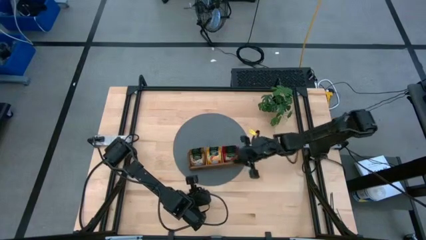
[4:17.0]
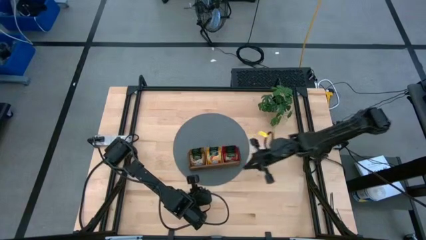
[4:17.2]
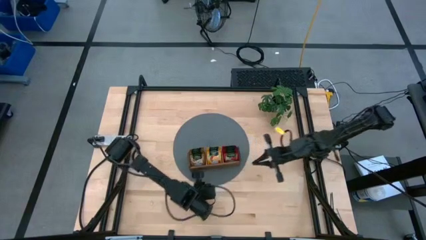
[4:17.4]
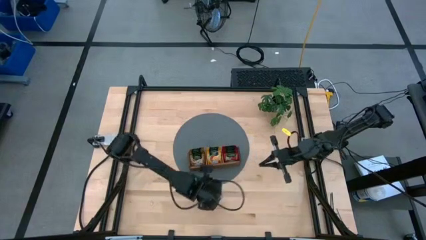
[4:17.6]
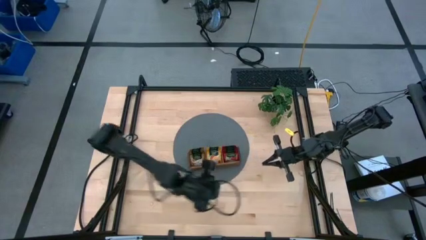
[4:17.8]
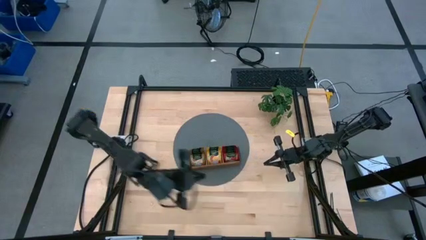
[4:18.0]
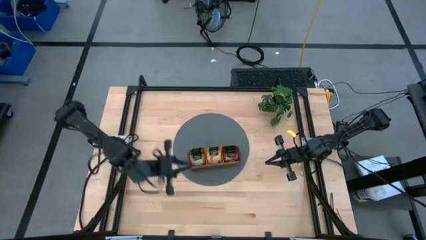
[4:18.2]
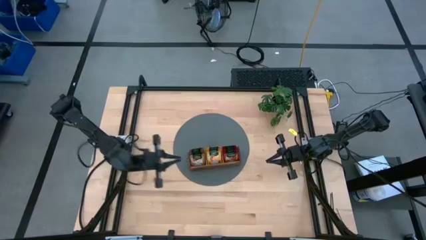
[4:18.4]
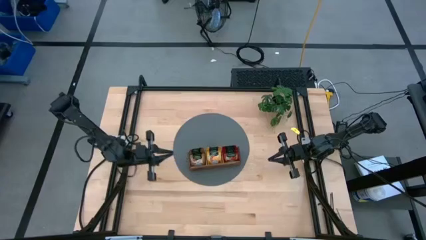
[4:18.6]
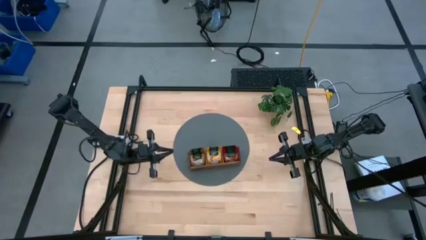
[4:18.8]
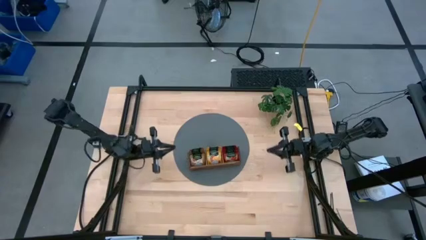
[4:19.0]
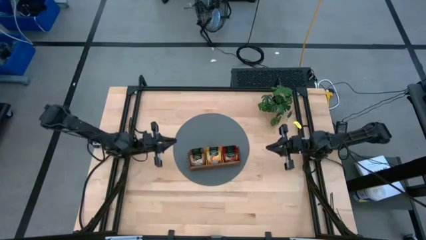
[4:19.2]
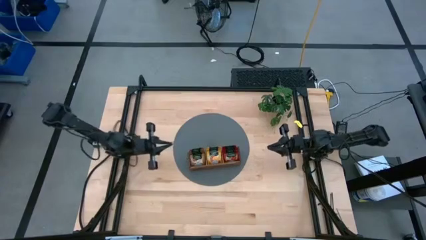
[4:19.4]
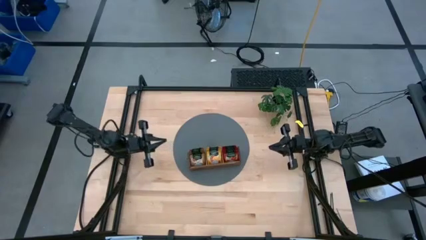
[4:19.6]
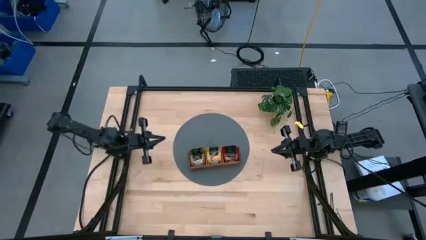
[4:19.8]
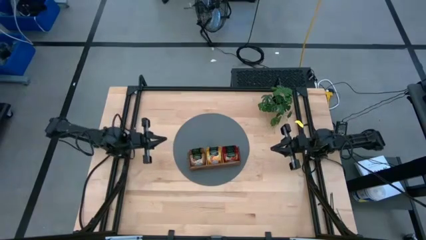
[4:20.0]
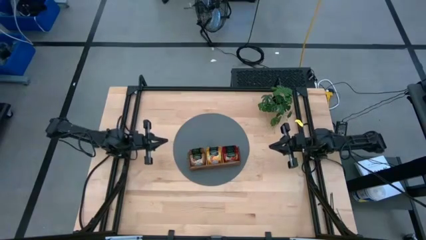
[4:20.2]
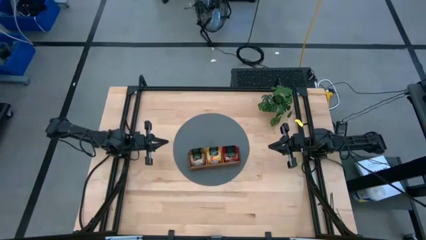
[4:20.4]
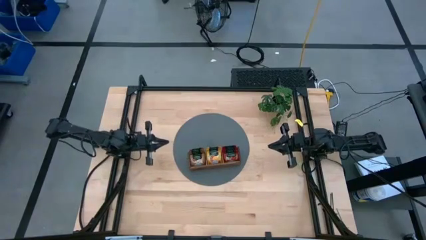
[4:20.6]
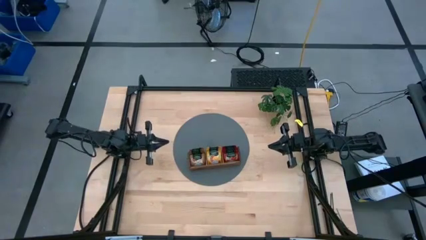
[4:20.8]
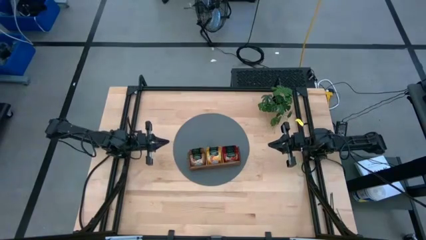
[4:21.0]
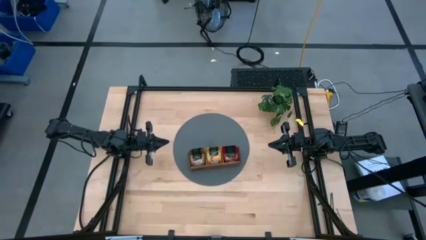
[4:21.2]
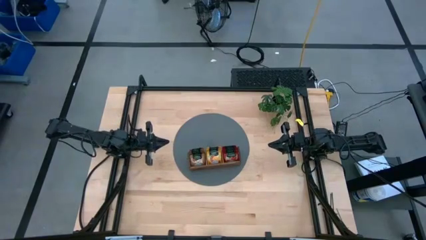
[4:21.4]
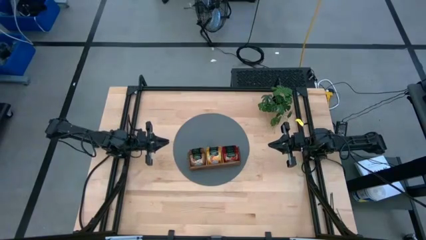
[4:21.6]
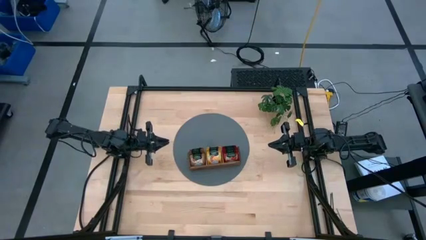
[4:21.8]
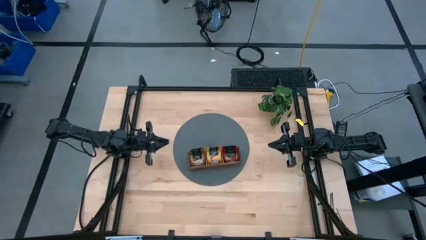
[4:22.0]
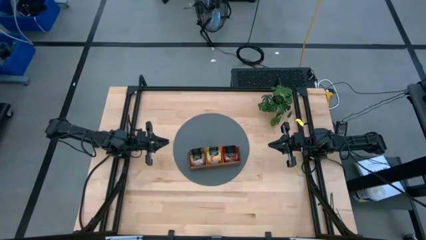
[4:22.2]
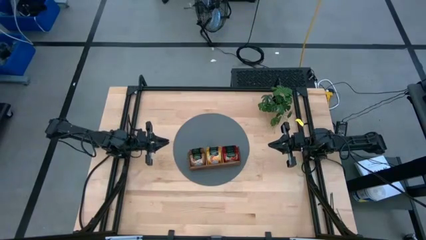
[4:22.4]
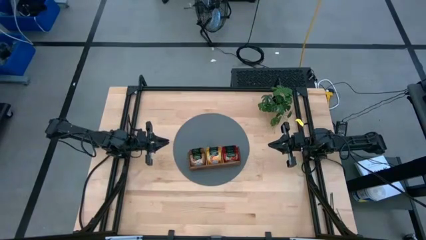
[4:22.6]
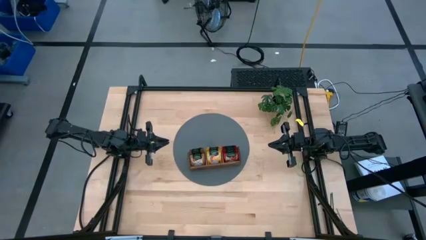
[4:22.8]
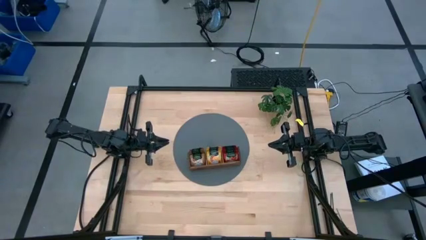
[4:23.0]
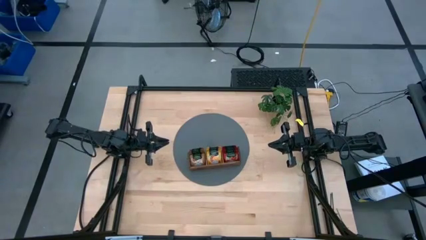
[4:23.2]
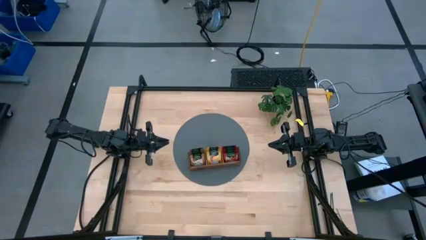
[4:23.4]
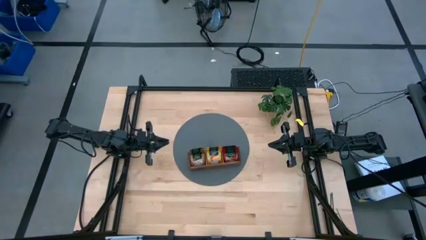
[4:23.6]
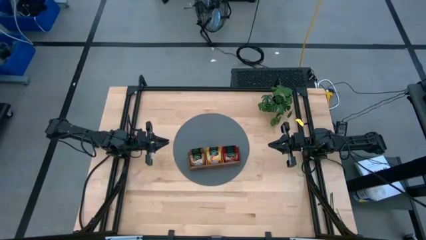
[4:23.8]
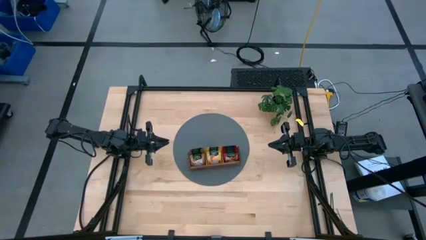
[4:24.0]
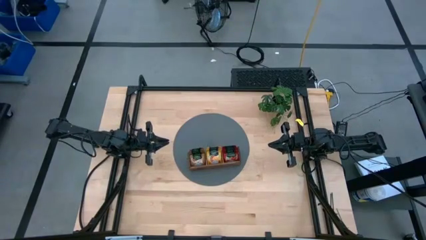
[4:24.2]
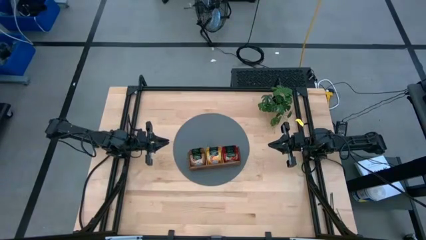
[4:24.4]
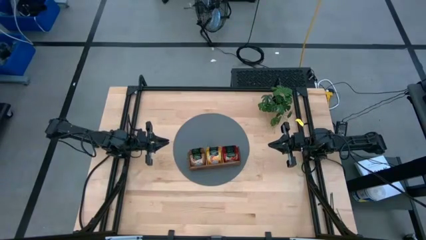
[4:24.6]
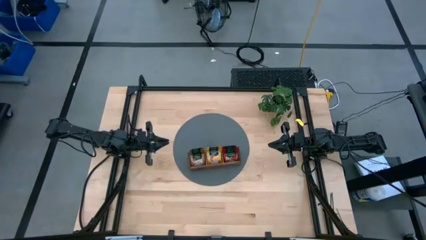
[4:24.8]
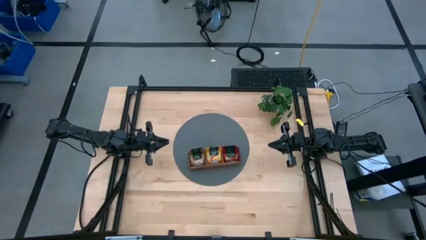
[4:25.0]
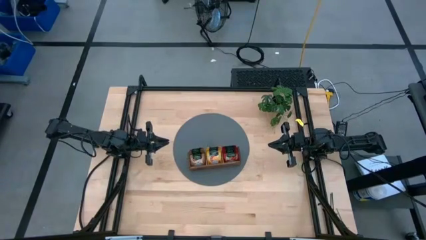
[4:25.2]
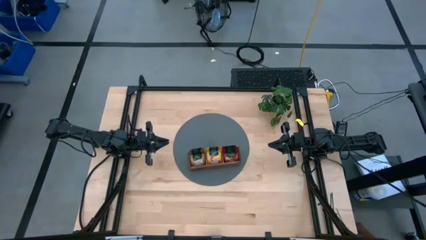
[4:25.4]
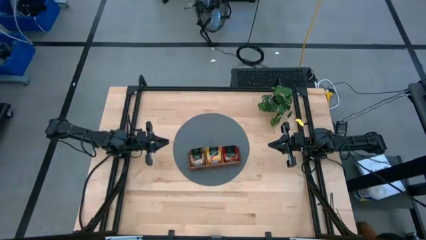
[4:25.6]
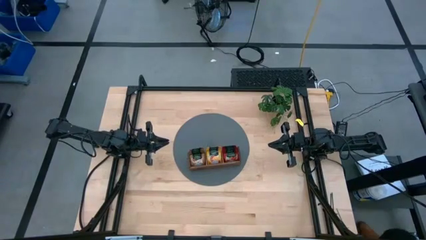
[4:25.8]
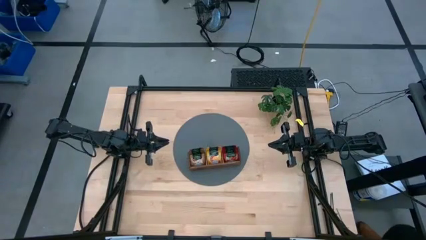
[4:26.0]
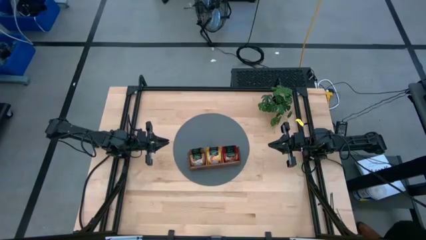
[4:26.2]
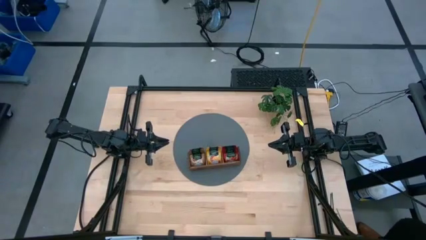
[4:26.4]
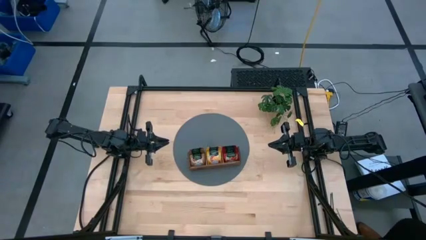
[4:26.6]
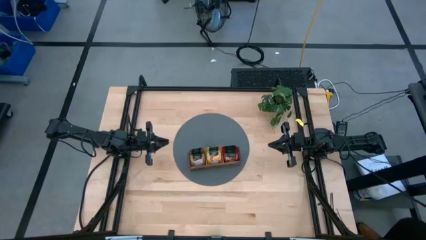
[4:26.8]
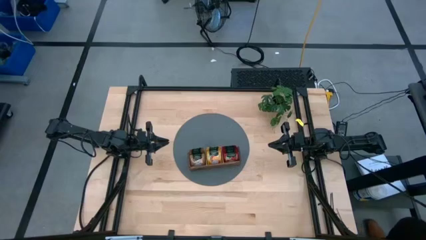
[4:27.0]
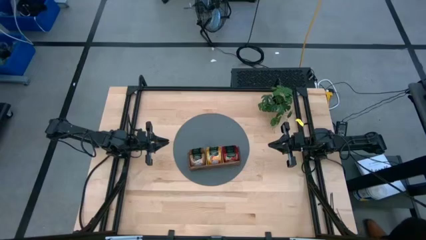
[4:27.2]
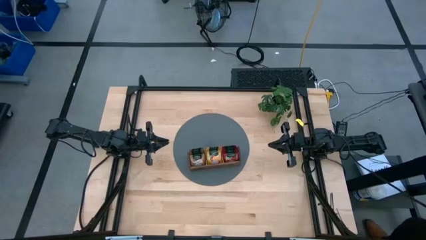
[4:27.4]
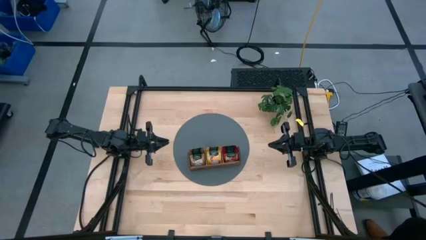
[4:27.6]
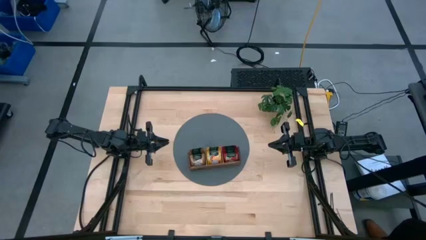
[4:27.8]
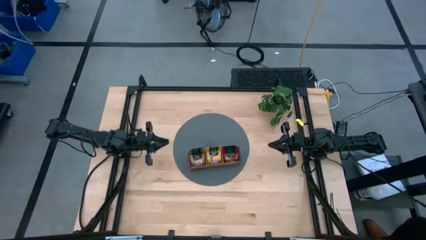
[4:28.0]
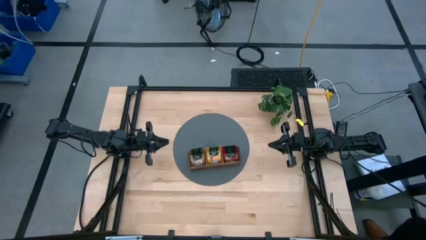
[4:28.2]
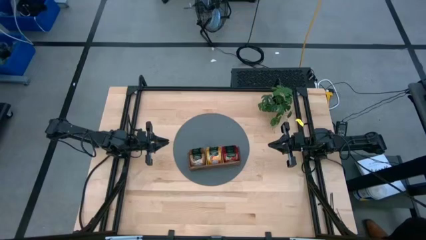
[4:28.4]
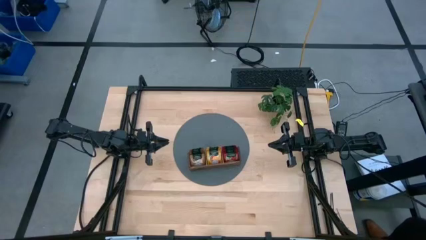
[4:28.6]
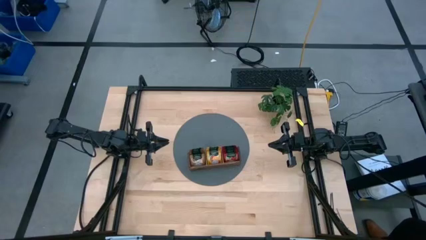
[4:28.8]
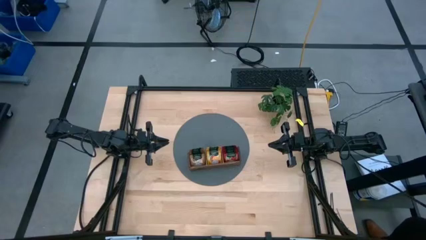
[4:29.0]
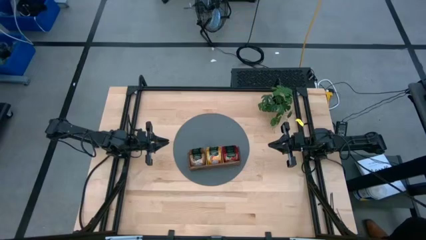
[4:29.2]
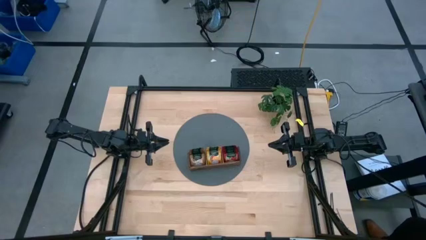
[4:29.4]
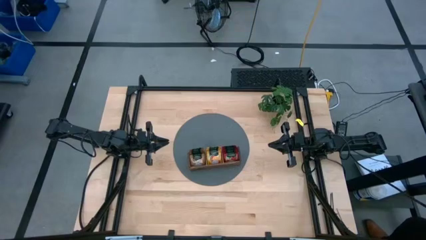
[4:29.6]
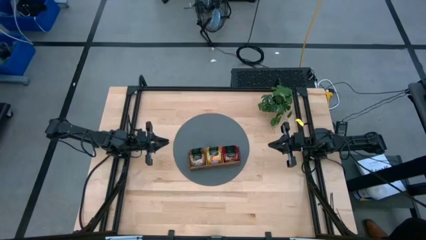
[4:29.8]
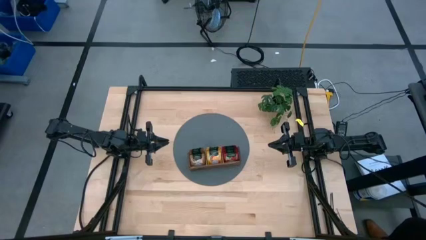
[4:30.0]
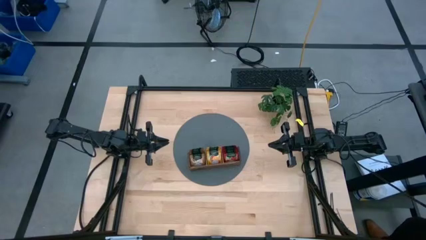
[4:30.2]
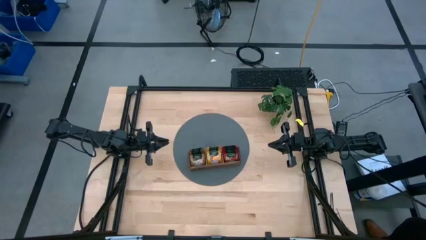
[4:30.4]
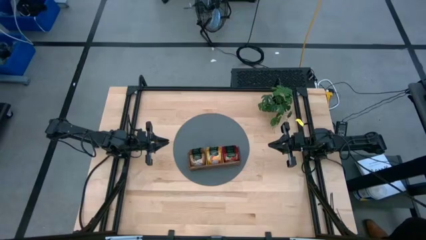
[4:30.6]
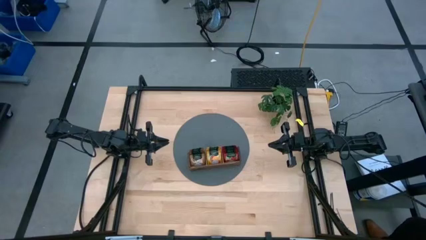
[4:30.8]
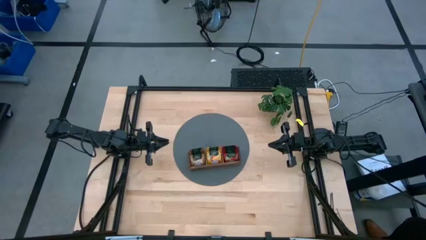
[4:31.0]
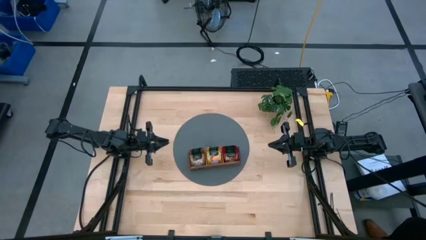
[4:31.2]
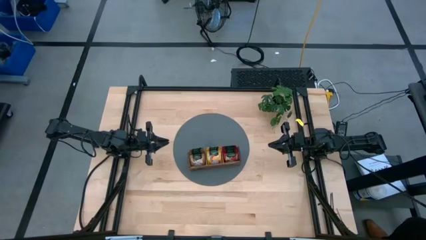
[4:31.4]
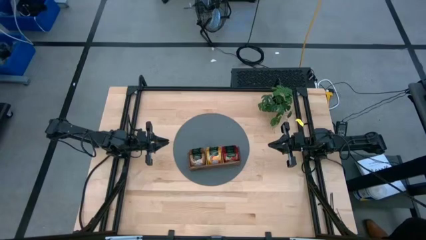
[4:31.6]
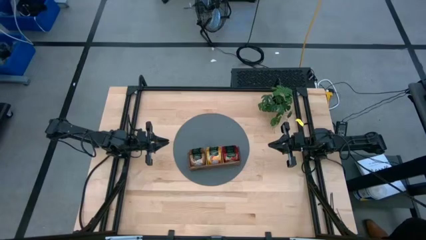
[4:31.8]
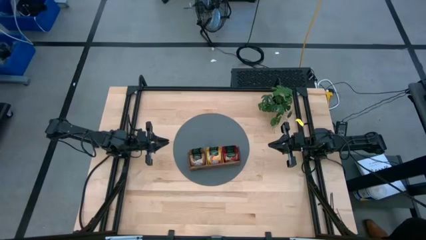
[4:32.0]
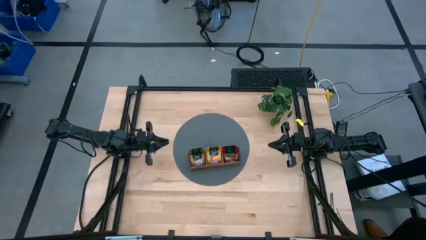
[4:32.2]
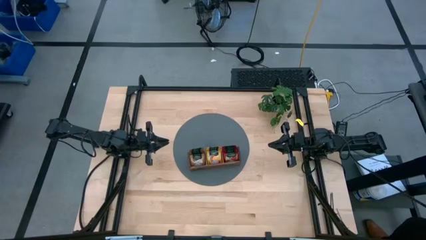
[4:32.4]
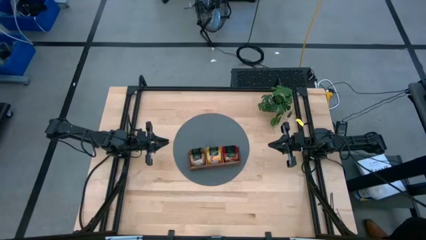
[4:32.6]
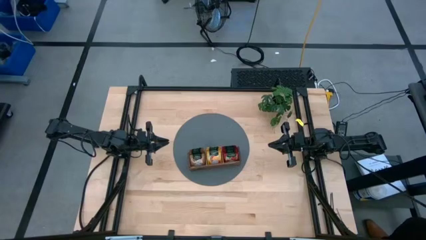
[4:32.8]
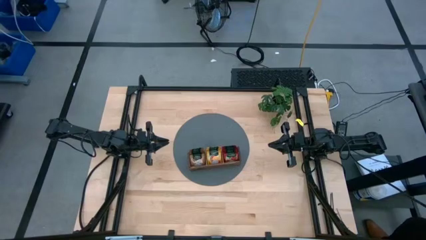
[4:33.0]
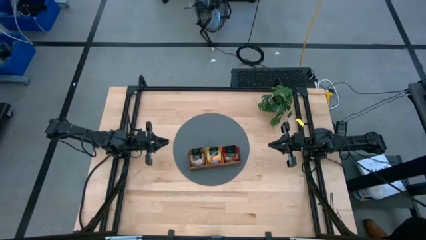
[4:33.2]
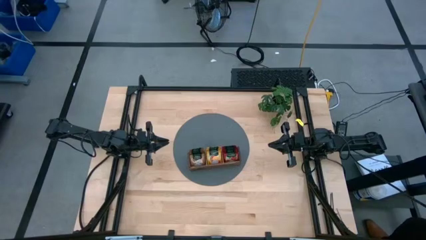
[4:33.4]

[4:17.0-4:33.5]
Task: Pick & Place Tea
Return to Home Position

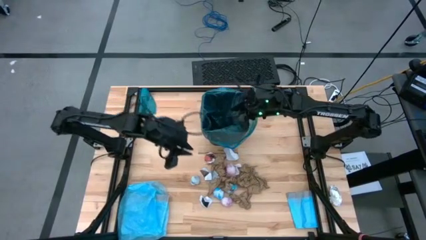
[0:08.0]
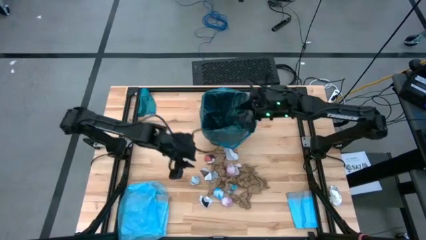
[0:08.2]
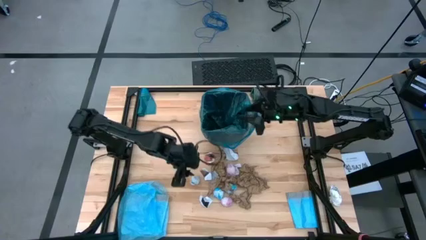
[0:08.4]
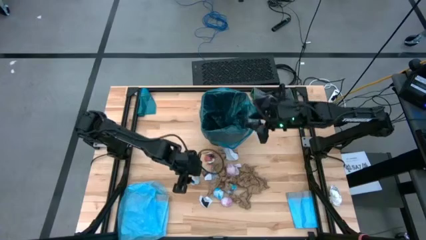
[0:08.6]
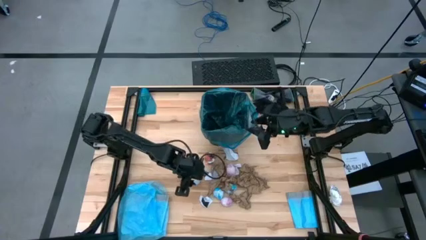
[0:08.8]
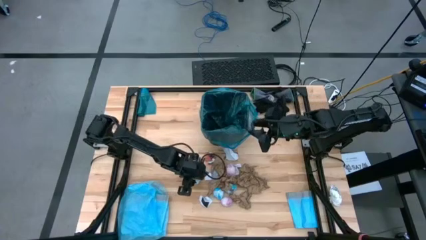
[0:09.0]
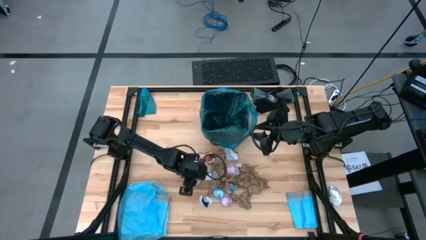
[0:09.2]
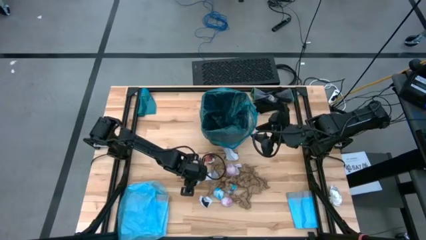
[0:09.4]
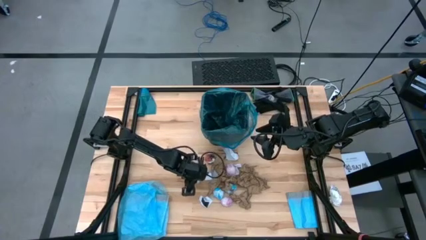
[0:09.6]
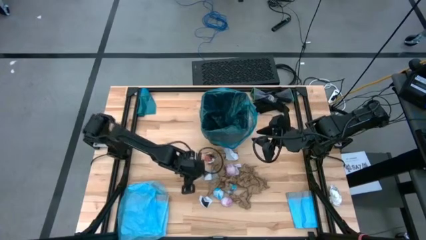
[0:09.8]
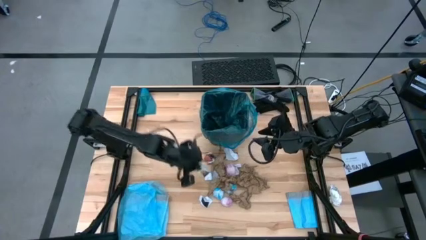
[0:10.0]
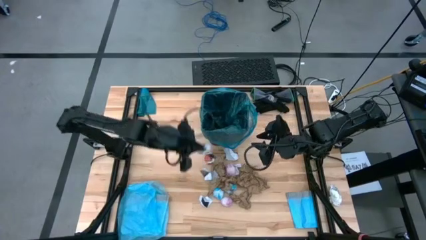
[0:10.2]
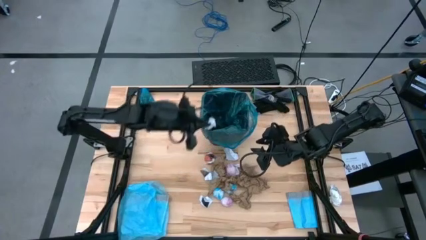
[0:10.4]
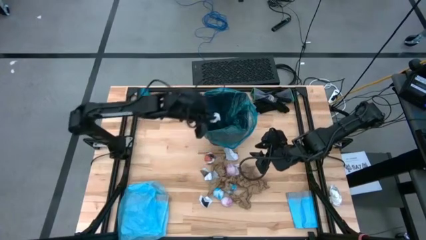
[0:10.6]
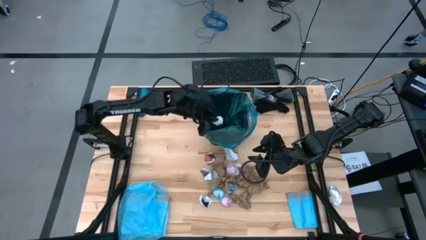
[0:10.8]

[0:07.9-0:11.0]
Task: place trash/remove bag and relplace
Put the blue plastic into the blue trash bag inside the black trash bin
